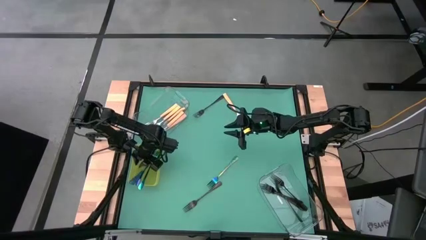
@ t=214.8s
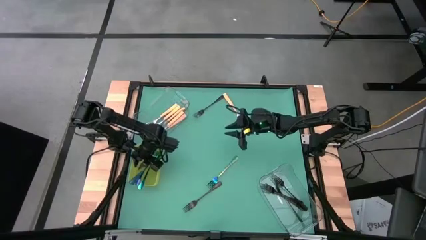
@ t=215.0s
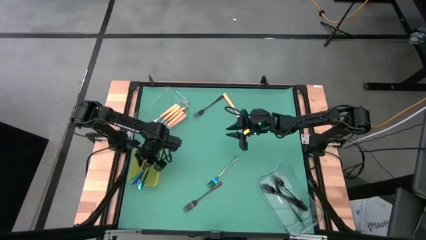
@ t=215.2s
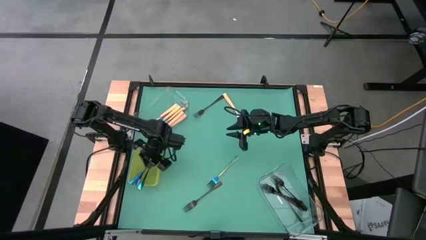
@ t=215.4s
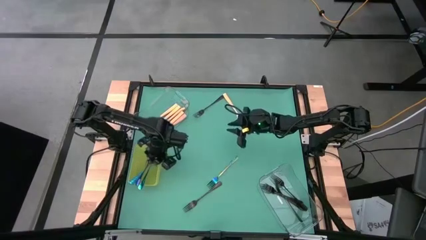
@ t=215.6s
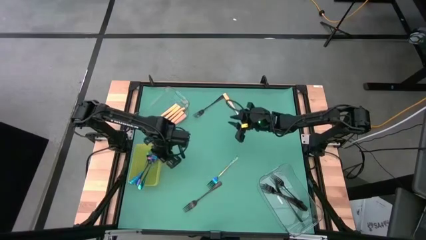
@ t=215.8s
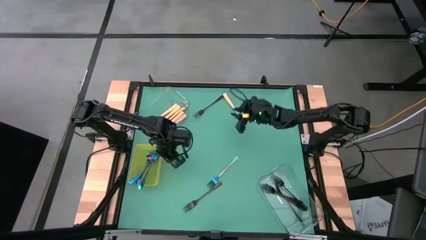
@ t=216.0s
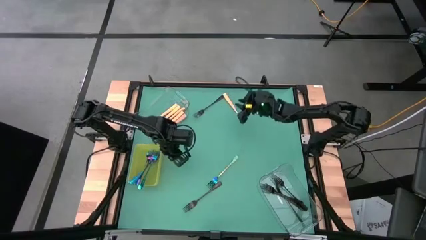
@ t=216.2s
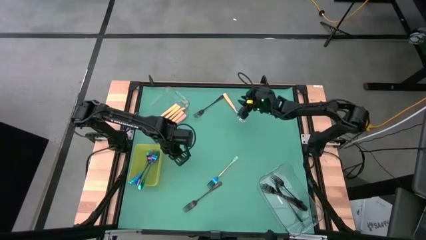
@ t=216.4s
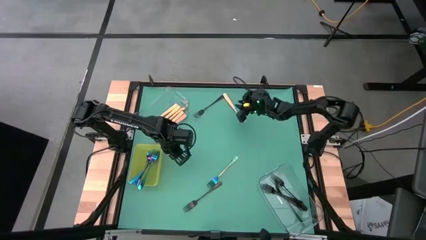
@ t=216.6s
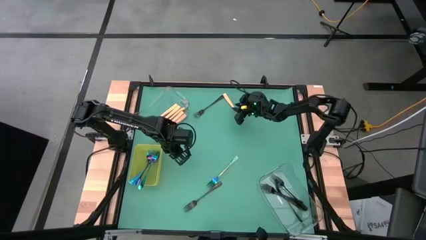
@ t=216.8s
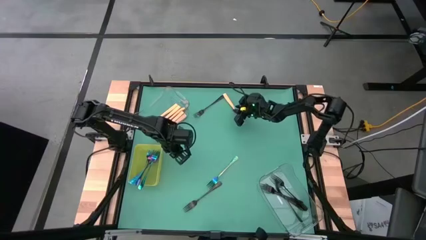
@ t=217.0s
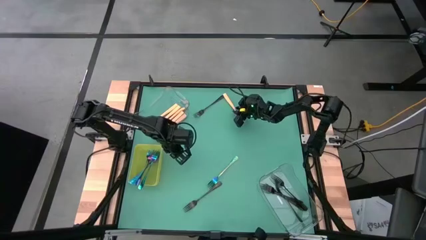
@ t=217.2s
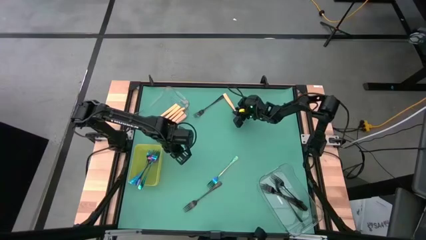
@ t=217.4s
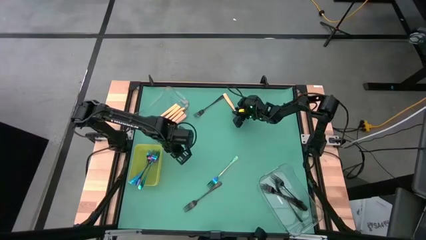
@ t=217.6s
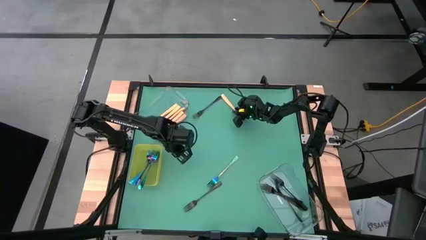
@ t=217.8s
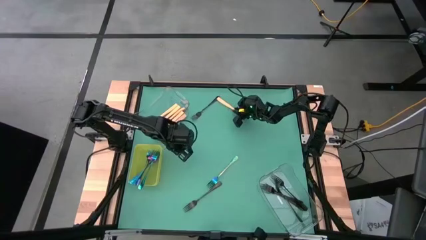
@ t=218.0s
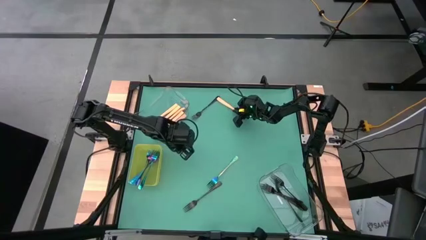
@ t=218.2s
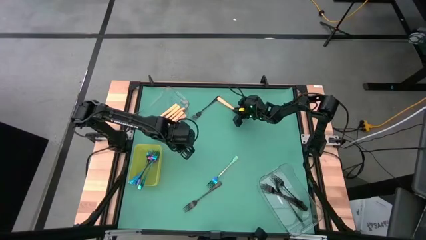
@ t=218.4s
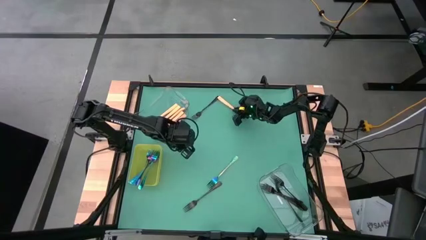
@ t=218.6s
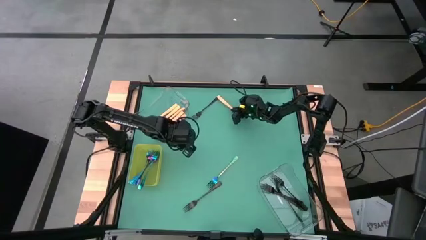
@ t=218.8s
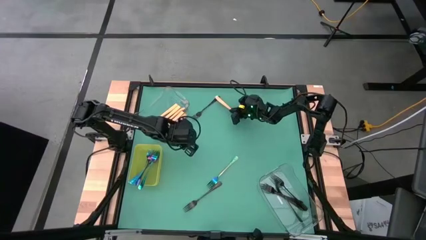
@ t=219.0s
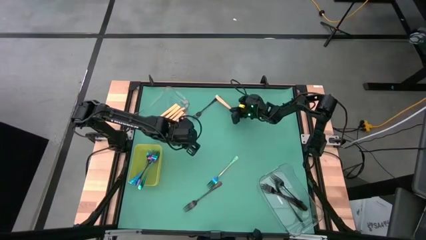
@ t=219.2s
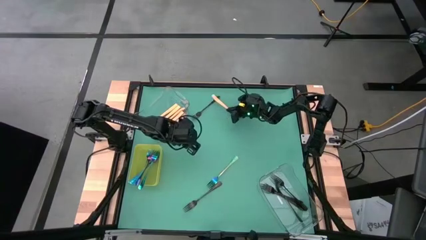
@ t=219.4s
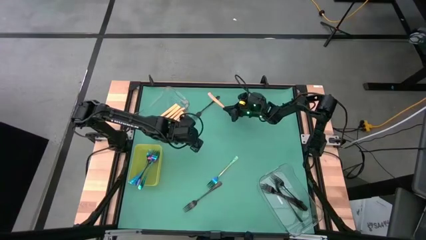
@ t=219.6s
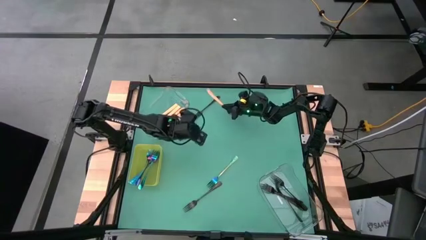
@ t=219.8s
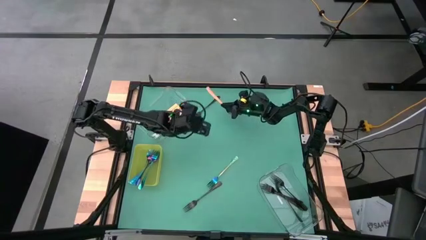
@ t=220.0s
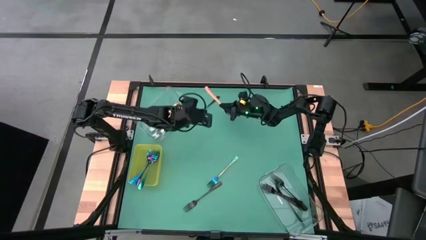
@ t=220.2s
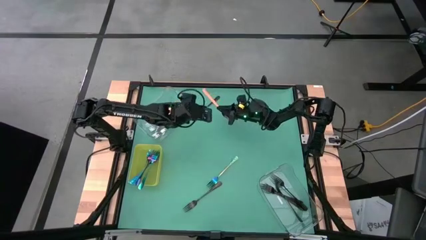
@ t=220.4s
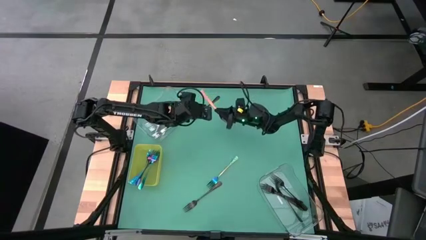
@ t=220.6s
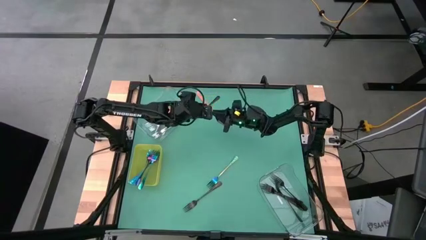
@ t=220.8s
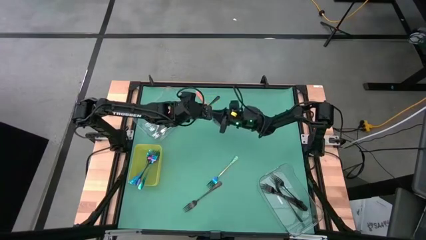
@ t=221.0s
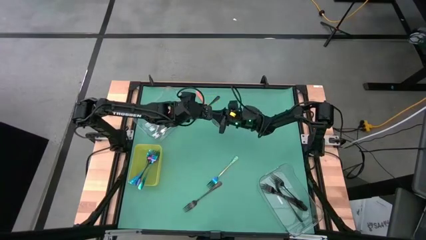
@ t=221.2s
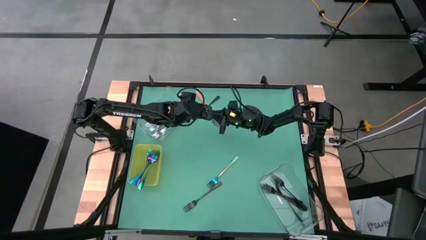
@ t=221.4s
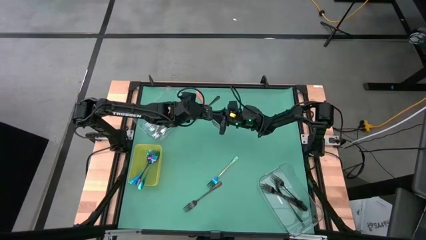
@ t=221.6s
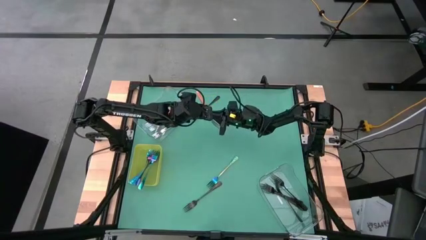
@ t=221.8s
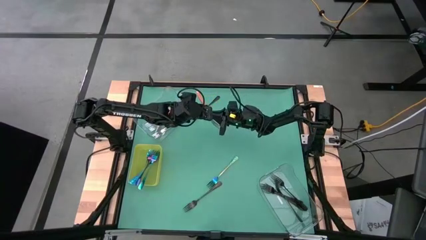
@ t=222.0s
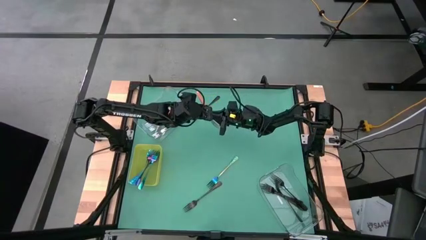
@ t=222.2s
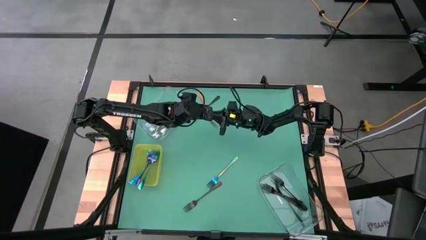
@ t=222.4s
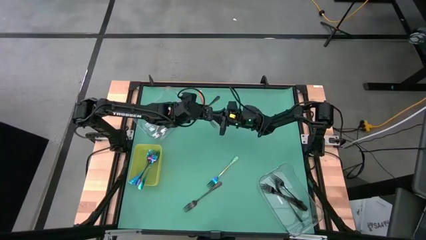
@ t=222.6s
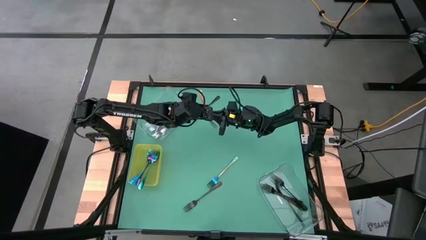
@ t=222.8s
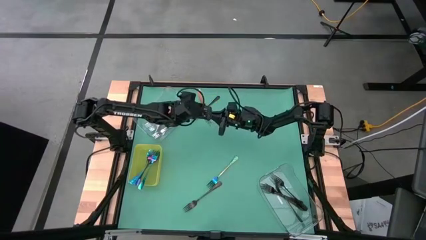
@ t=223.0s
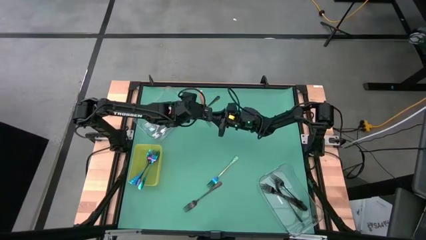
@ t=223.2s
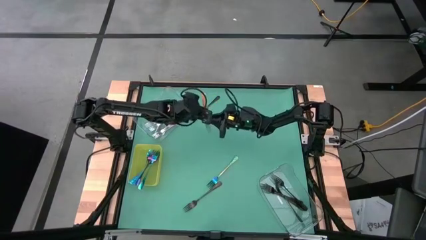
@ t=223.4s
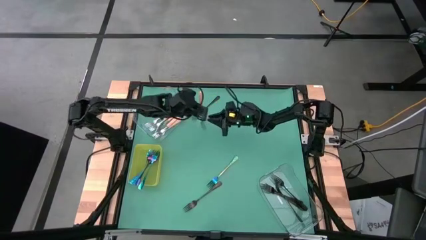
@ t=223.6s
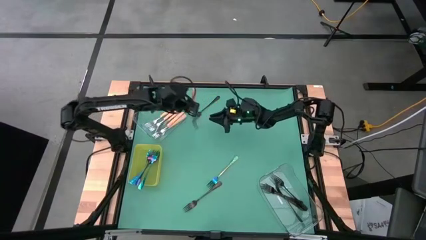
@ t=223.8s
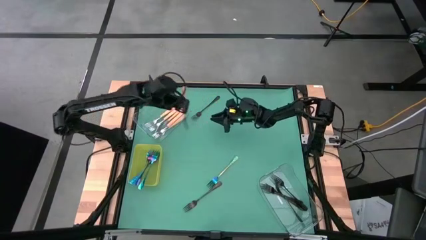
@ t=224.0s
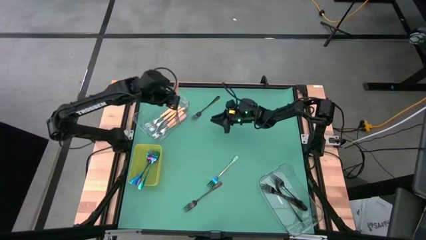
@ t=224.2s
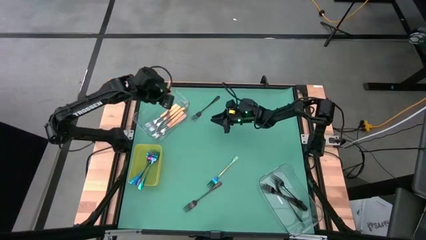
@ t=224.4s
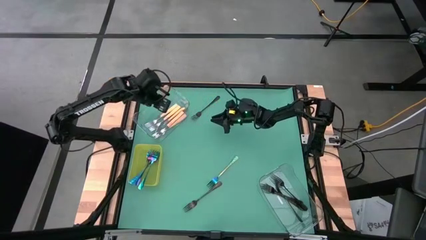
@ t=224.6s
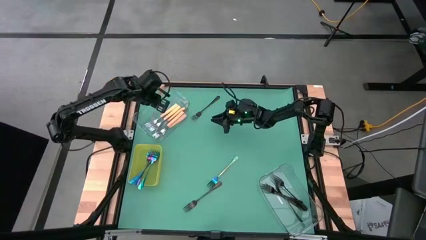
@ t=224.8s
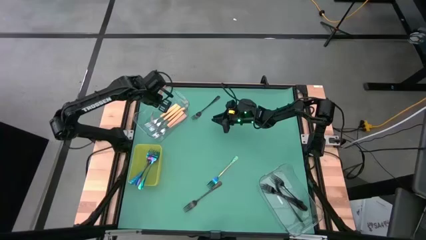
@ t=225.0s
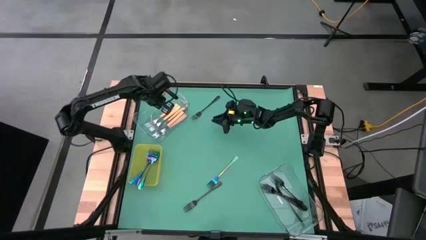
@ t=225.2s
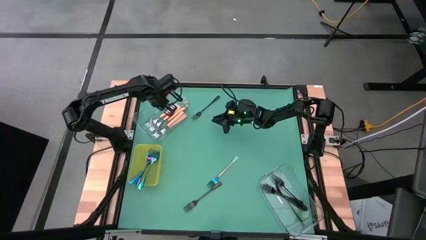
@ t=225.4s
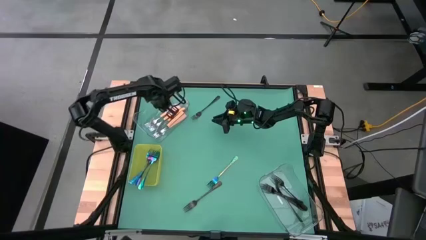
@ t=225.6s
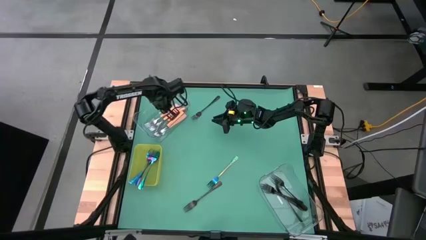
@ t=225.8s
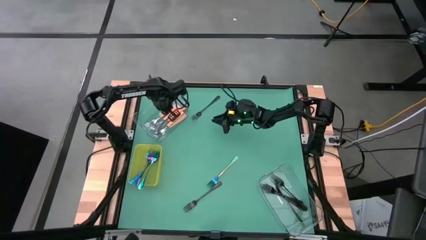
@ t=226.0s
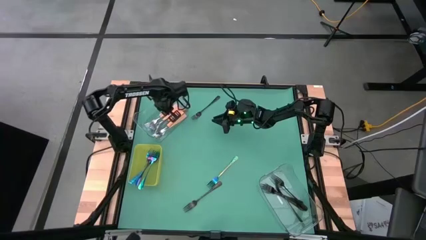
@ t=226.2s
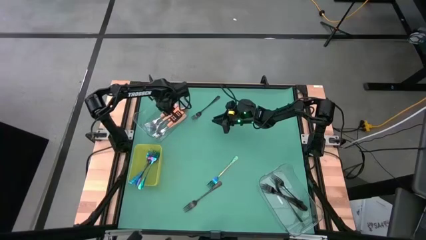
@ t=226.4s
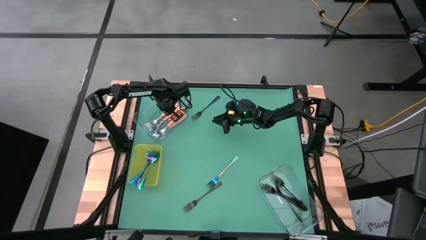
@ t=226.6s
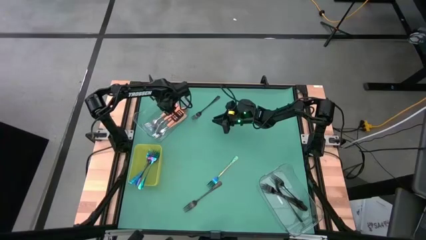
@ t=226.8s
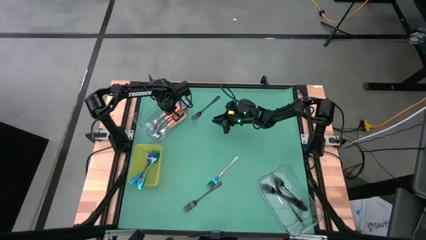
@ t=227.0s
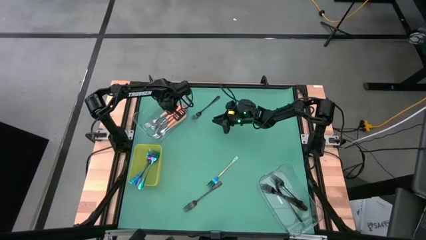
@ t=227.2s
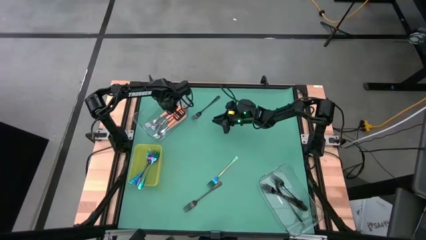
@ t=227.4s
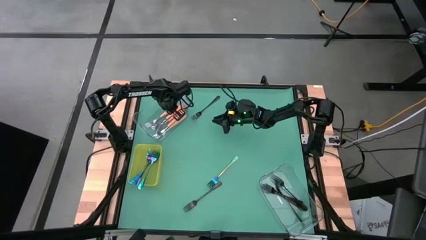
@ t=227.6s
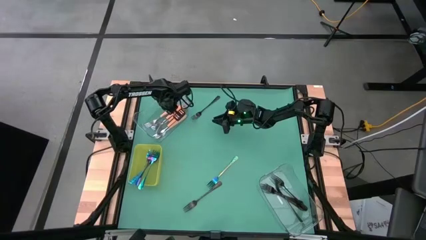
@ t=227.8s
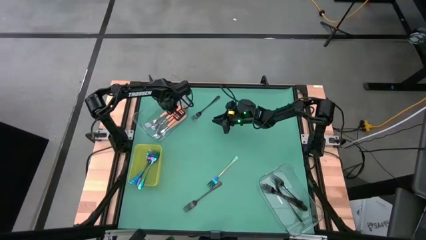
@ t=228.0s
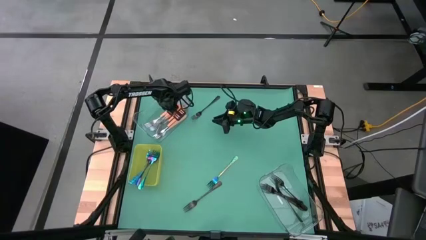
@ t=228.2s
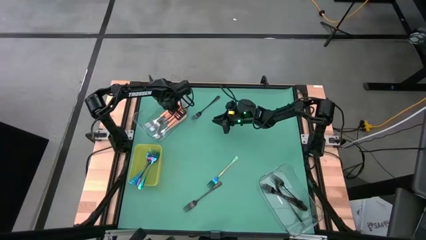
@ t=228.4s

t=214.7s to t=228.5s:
Task: Sort silverware by color (type)
Put the orange fork in the top transparent bin
